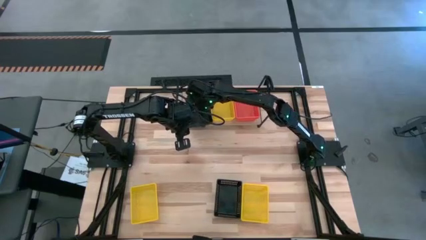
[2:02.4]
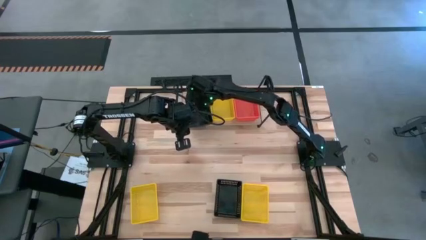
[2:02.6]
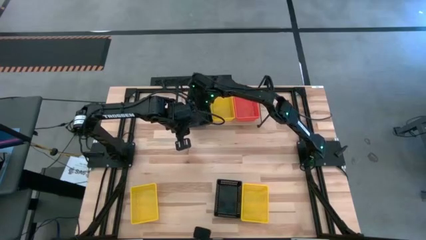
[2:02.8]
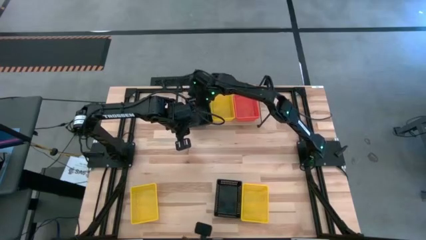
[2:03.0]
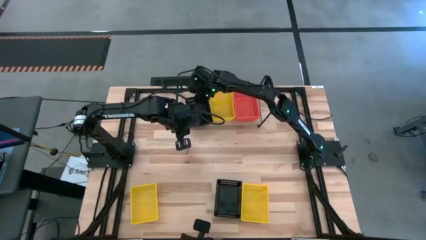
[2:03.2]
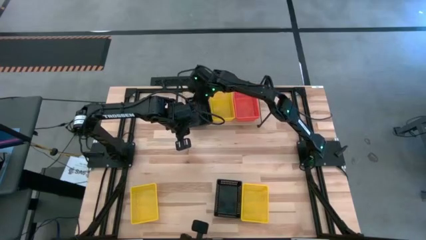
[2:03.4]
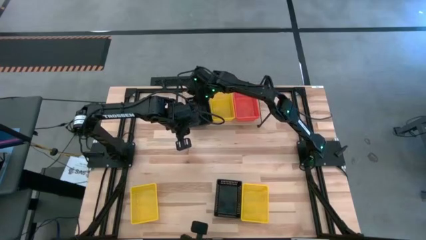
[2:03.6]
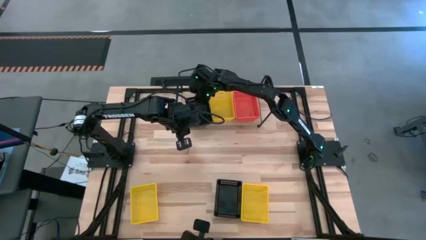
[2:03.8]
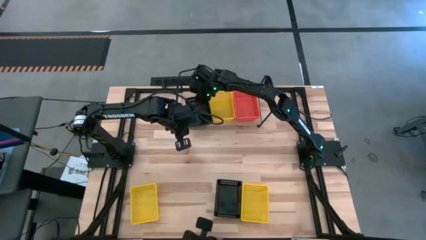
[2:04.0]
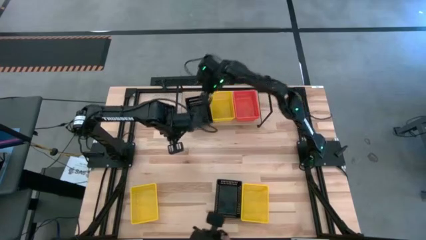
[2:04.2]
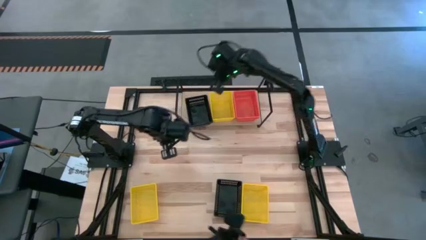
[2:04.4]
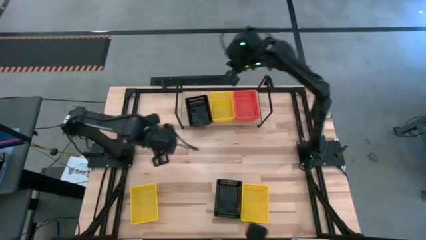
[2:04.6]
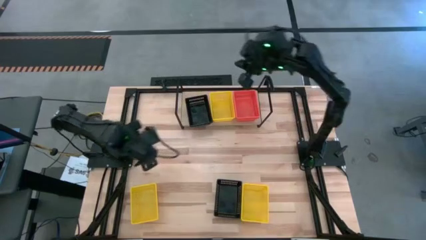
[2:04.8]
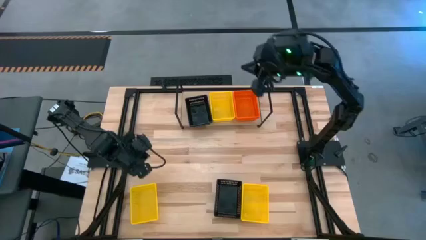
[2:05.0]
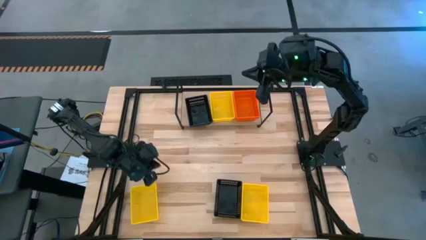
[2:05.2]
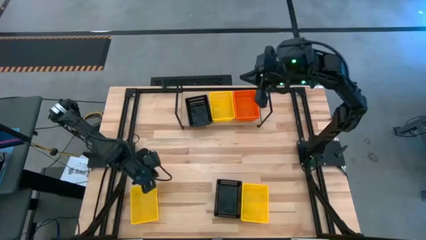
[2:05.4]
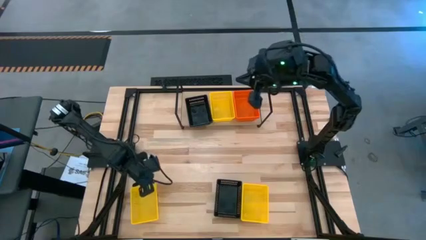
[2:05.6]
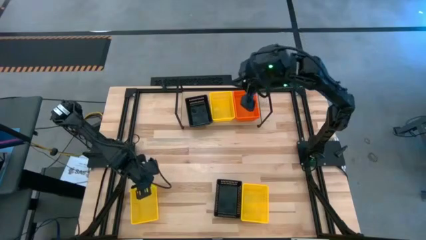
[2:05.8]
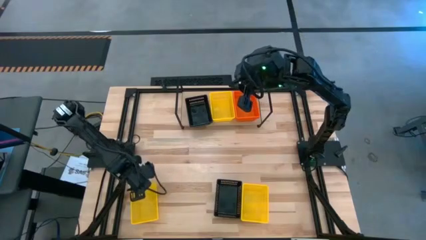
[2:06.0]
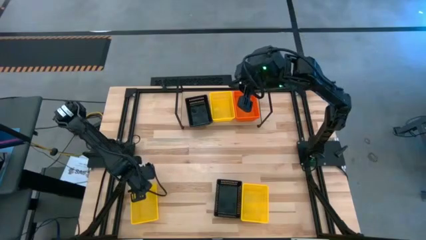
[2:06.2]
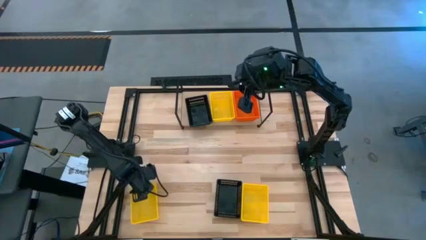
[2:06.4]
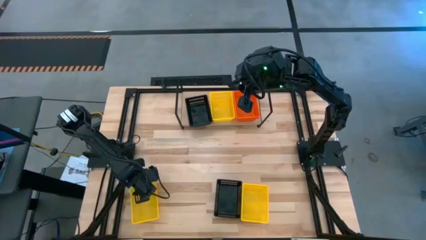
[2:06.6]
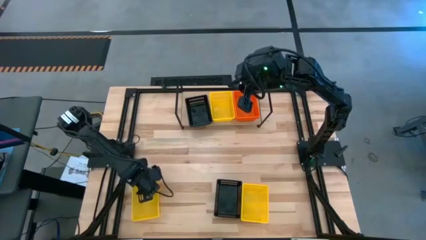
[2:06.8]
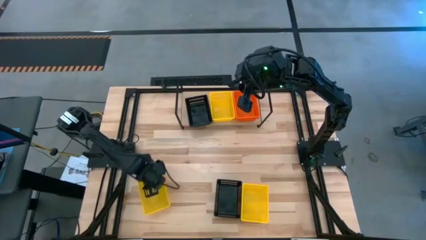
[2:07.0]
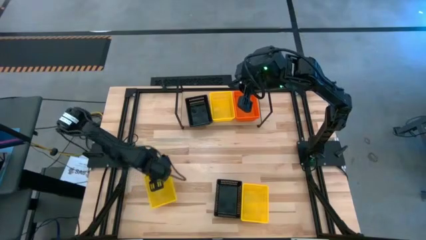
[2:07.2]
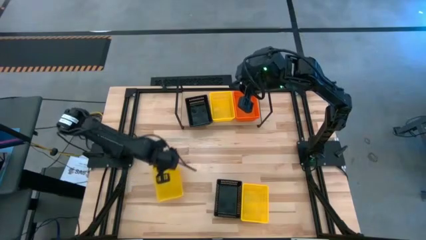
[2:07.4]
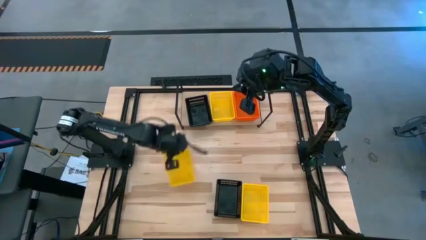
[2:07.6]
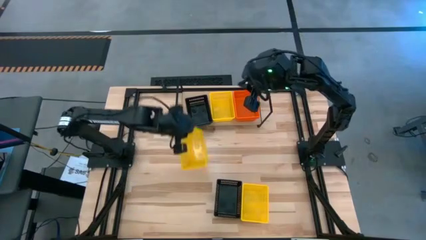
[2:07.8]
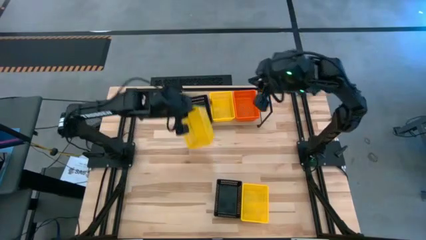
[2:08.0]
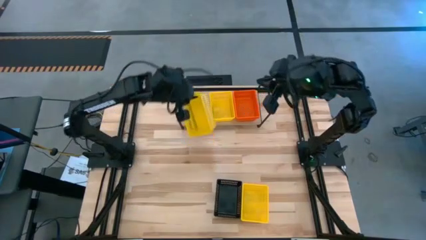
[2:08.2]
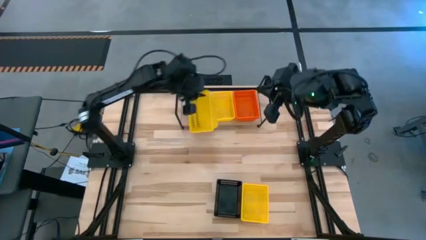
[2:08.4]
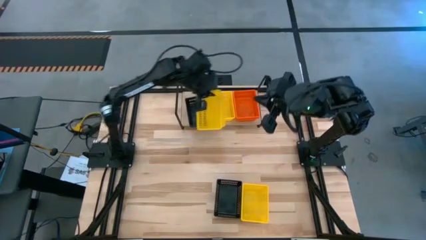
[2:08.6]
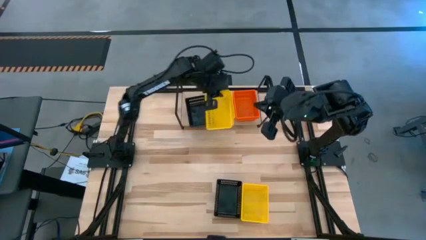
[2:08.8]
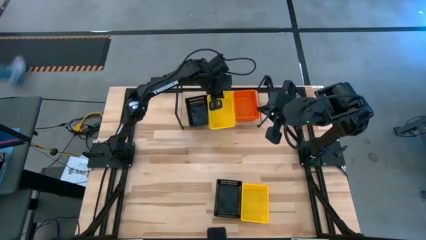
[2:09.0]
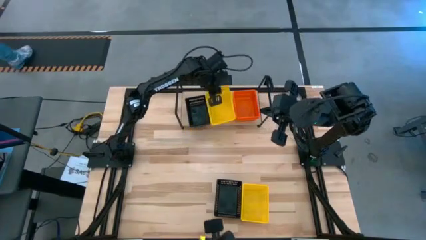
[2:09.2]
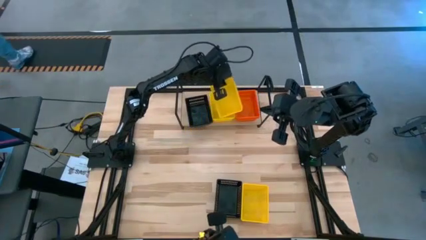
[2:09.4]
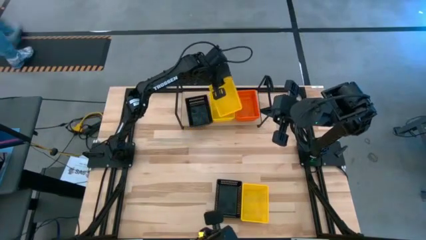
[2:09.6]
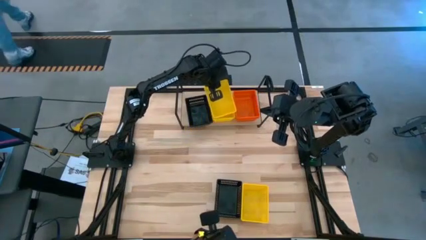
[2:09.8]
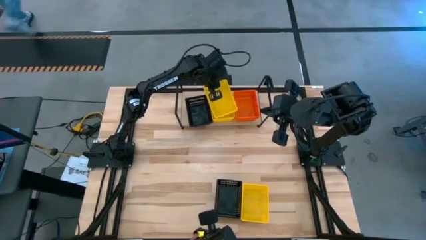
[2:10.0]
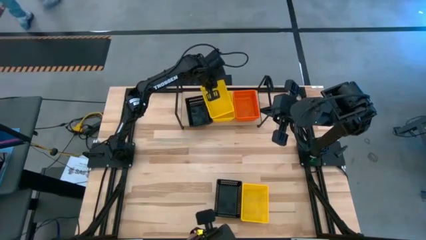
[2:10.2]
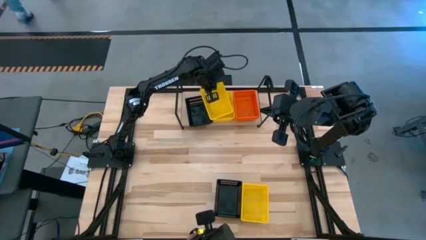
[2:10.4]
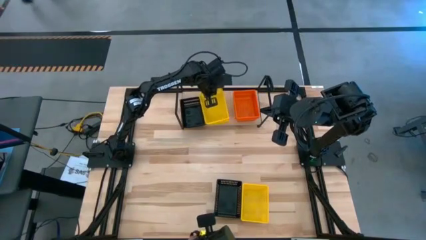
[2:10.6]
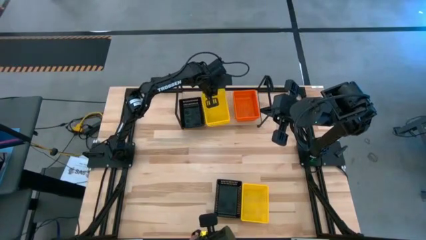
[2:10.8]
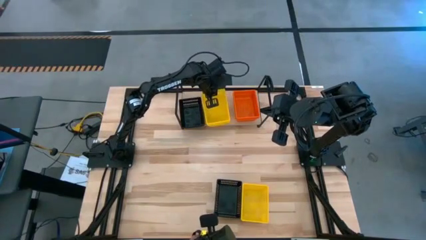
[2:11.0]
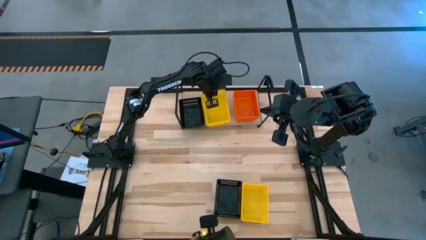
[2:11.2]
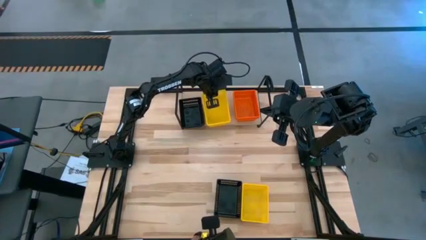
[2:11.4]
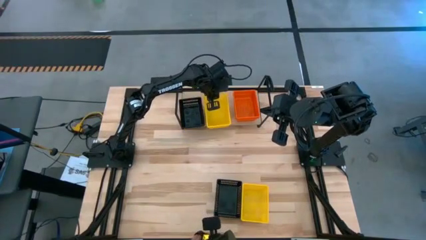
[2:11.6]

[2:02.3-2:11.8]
Task: Stack baskets on shelf by color
Stack the left yellow bin on top of the other yellow bin on the shelf

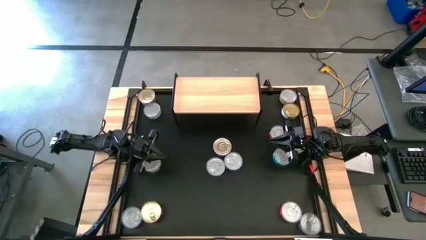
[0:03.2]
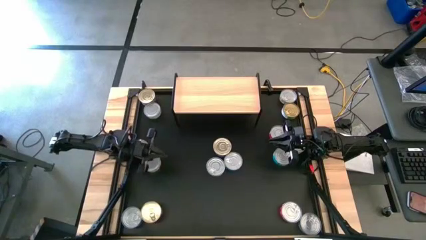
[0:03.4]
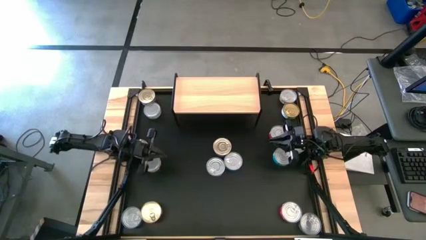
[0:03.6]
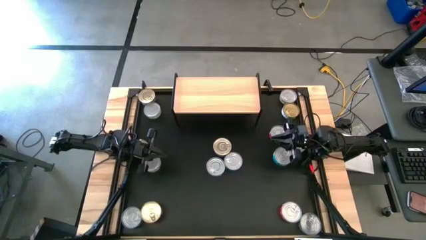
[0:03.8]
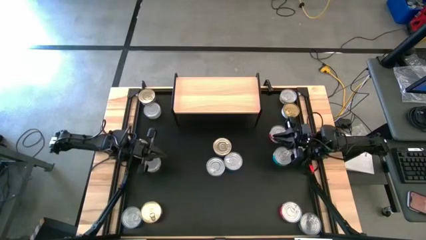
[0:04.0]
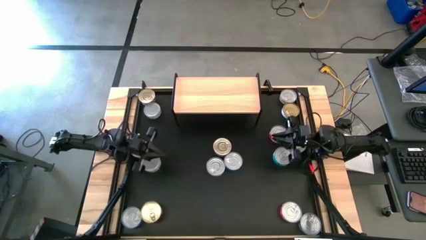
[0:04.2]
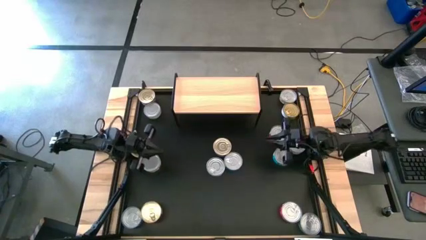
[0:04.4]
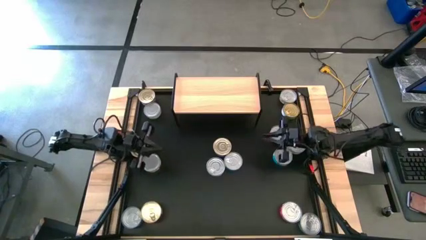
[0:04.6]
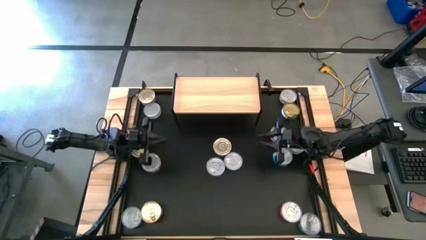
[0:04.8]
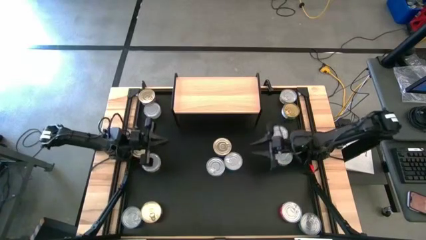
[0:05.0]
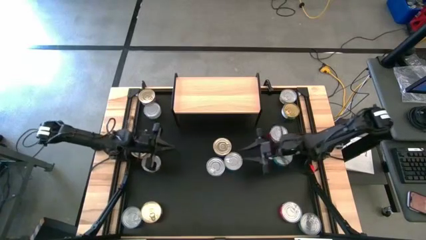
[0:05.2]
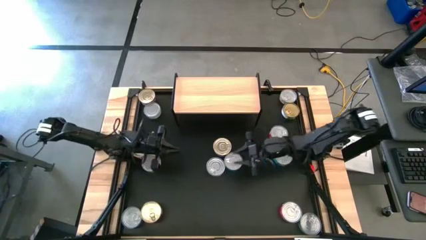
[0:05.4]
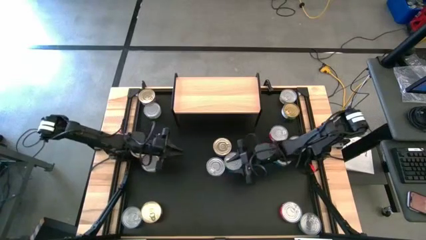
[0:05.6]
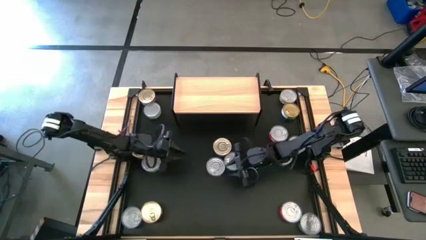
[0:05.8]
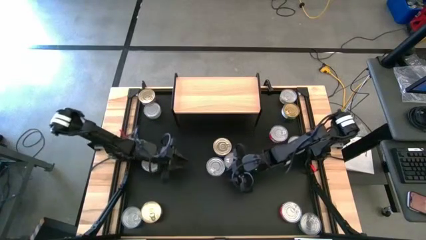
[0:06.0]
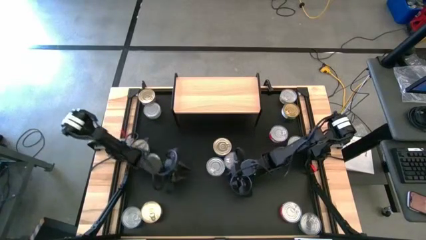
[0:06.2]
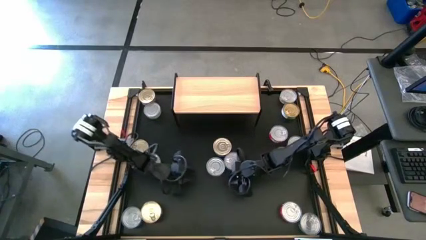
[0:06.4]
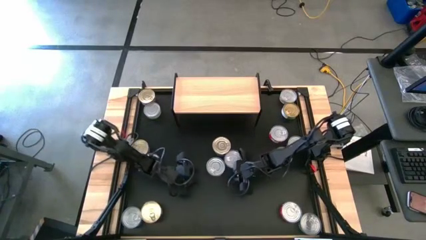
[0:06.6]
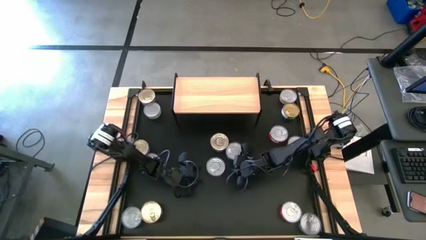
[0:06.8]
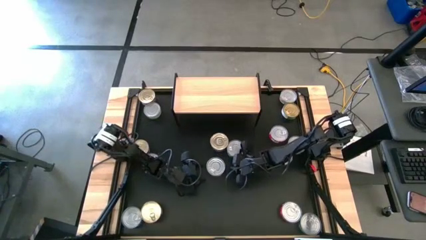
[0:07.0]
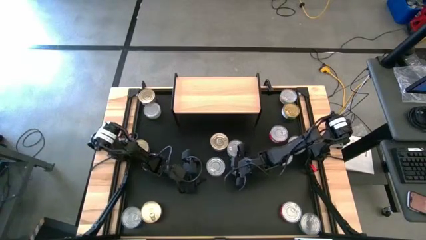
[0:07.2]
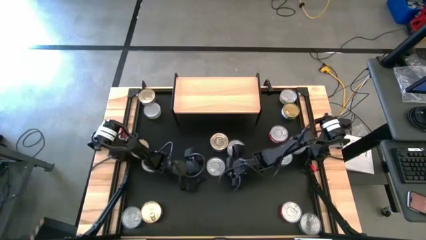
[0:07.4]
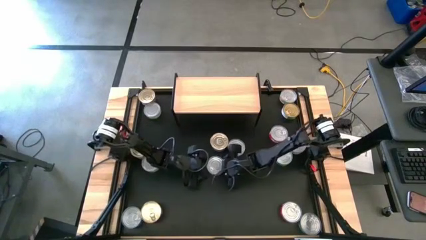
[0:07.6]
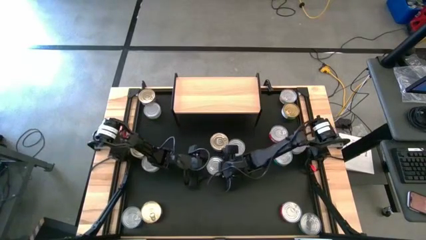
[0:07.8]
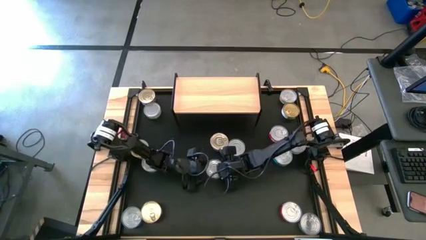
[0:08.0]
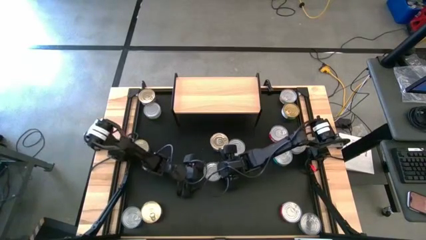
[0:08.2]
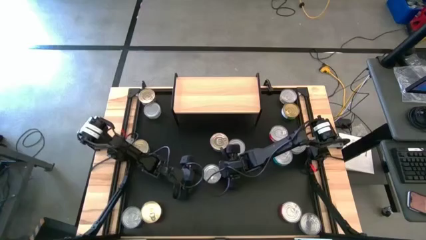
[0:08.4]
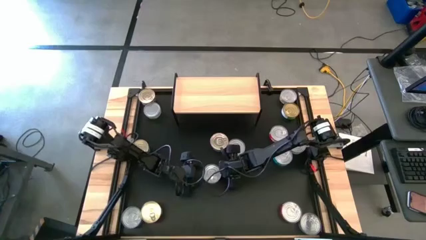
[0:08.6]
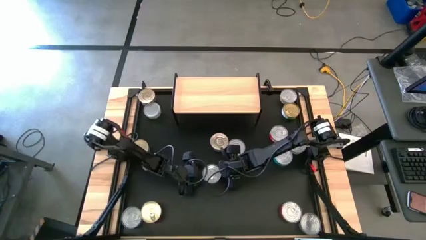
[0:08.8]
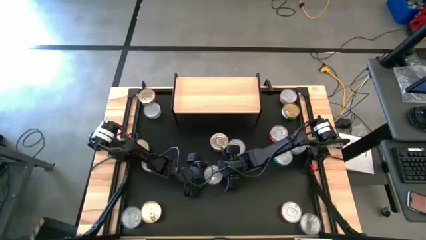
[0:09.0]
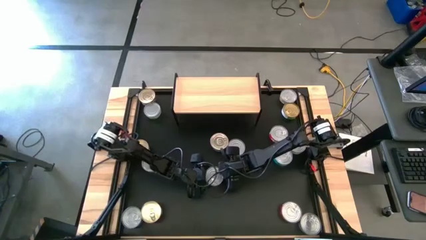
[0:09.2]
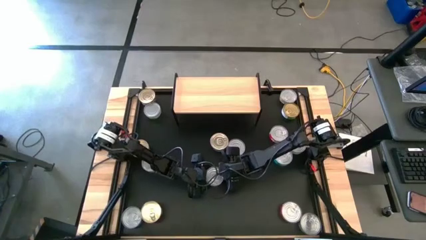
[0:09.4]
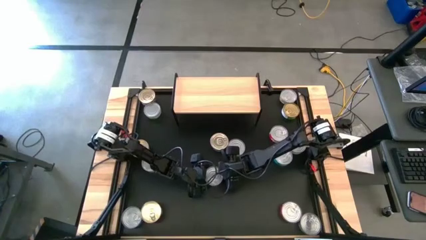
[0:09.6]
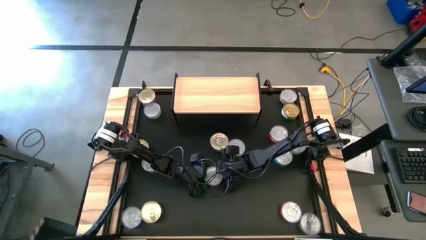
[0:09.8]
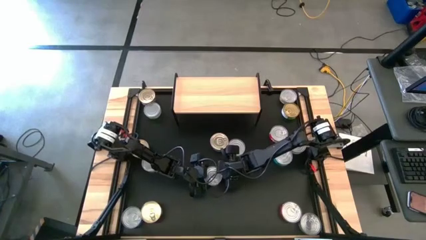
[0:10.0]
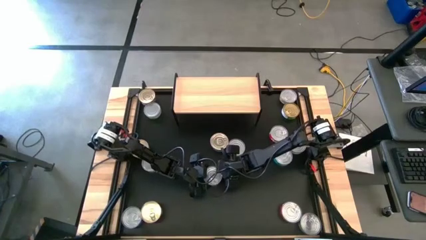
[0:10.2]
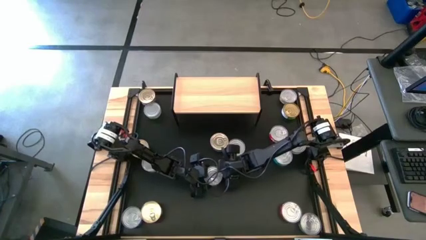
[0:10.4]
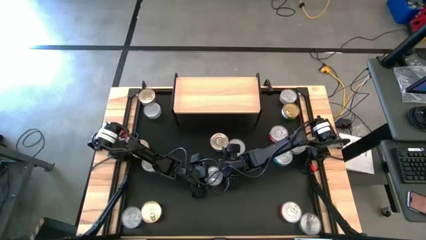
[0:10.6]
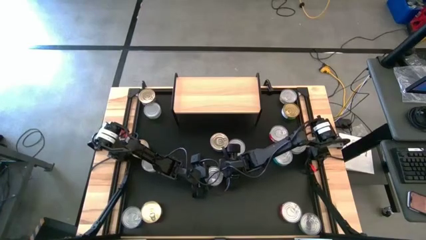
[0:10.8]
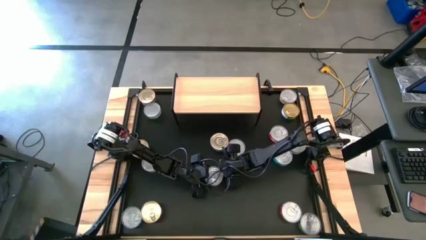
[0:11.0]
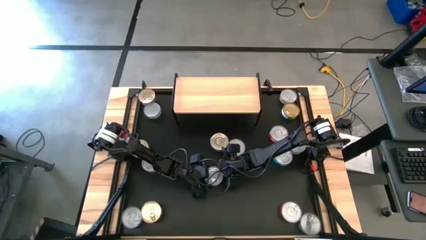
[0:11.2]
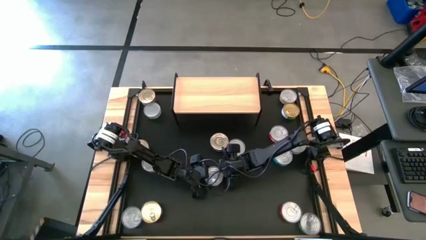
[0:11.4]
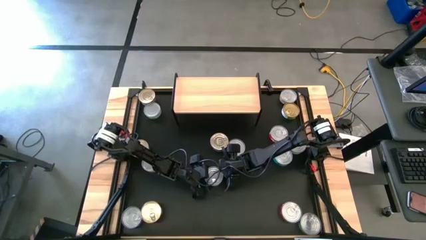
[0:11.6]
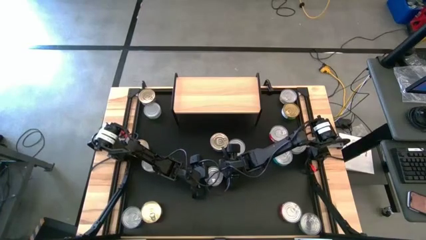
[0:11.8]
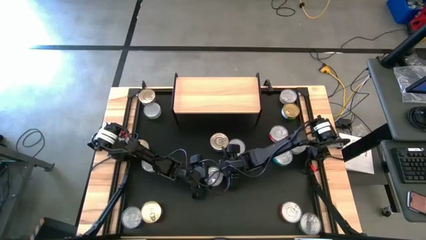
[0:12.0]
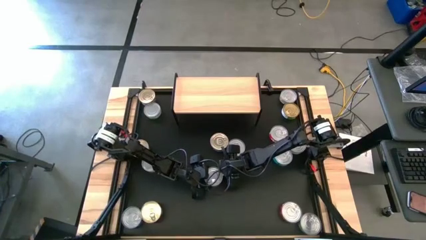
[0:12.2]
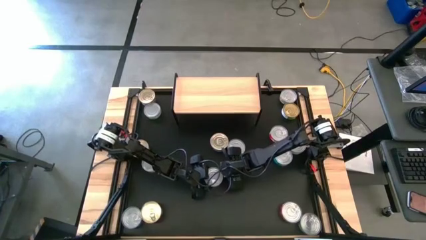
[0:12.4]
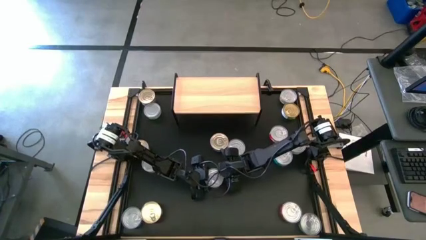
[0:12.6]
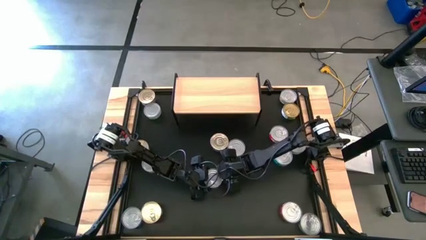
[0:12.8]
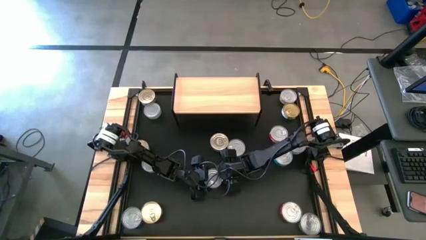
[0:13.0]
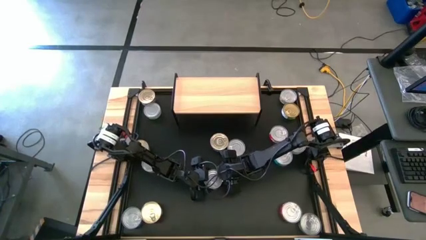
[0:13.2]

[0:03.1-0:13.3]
Task: Stack canned seafood by type on shelf
Put the blue tuna can on the shelf
